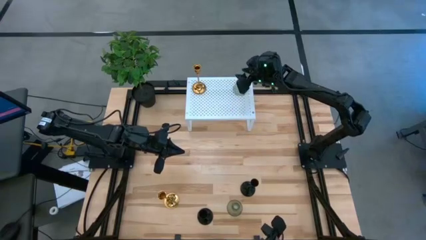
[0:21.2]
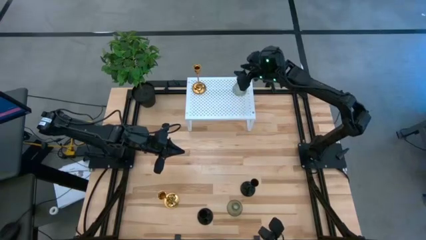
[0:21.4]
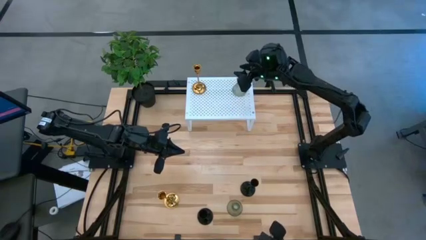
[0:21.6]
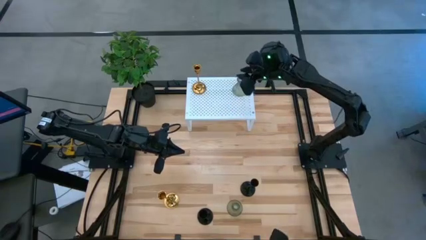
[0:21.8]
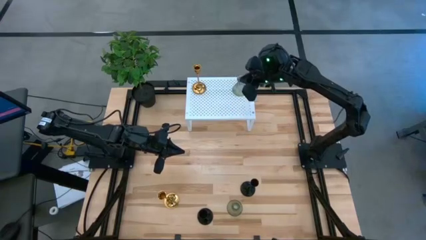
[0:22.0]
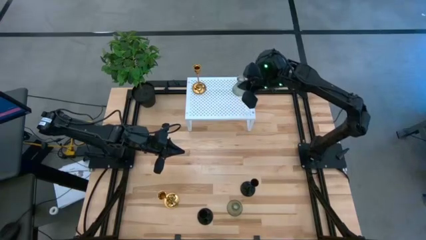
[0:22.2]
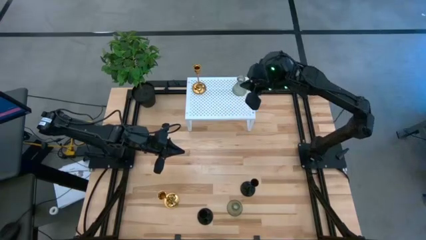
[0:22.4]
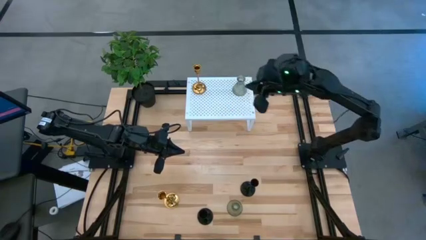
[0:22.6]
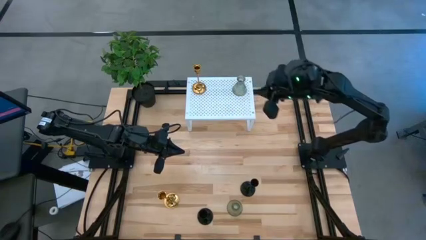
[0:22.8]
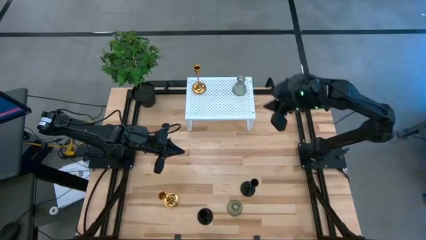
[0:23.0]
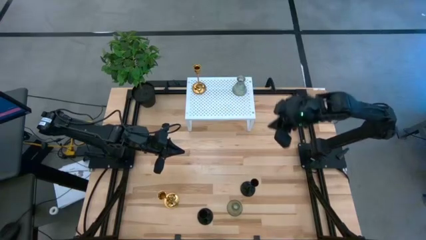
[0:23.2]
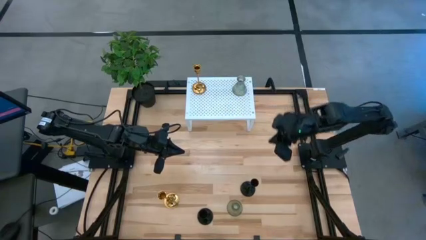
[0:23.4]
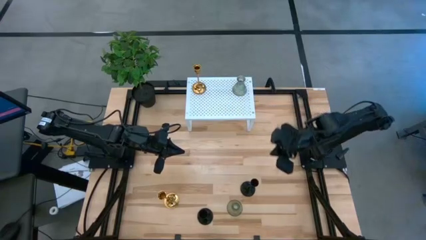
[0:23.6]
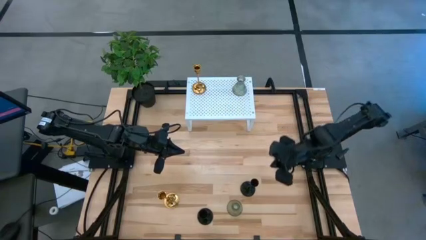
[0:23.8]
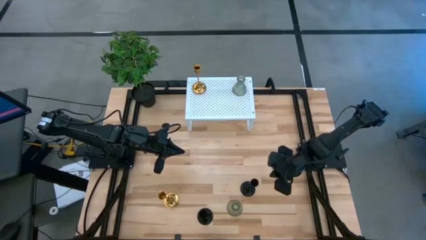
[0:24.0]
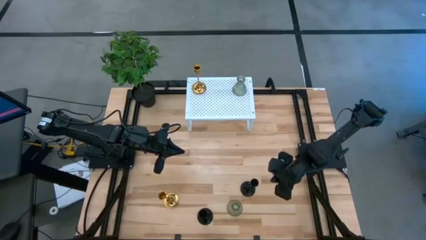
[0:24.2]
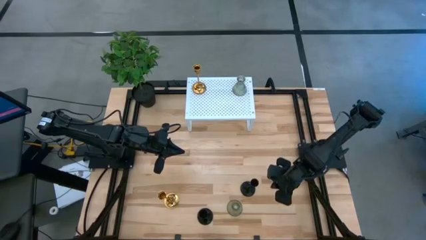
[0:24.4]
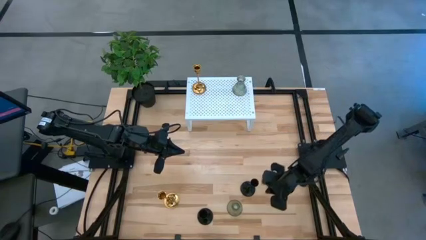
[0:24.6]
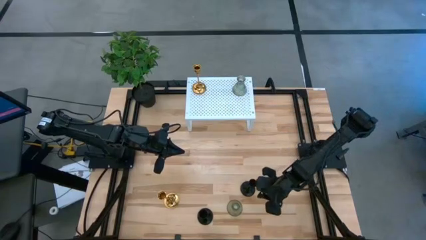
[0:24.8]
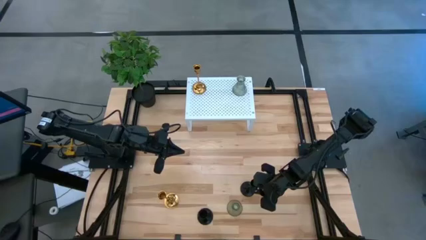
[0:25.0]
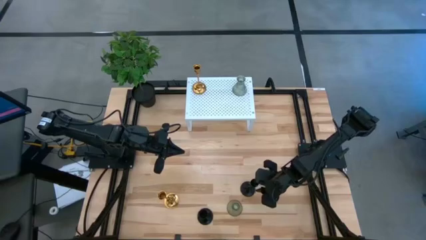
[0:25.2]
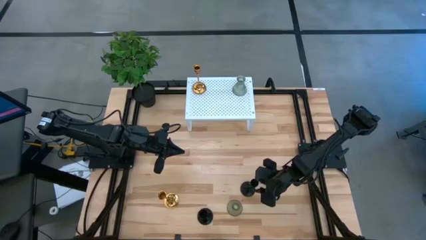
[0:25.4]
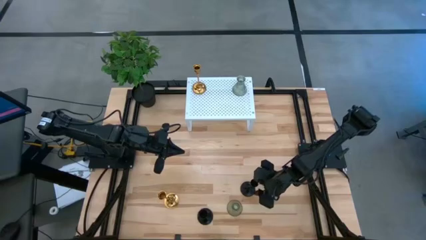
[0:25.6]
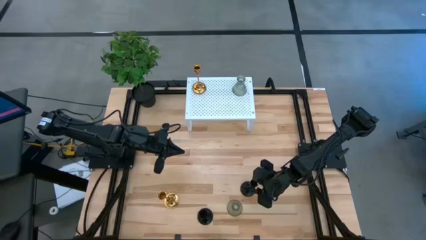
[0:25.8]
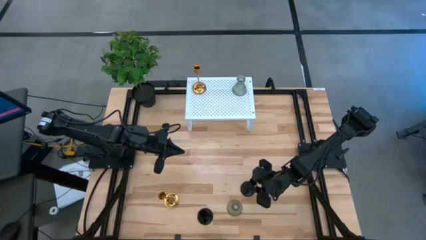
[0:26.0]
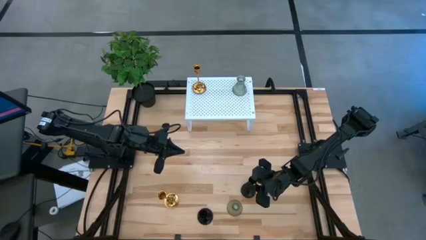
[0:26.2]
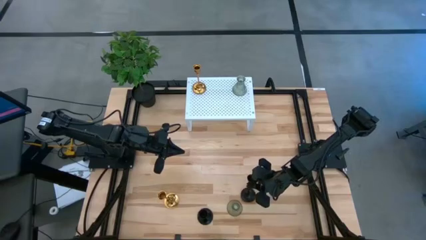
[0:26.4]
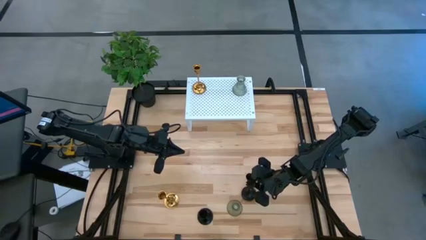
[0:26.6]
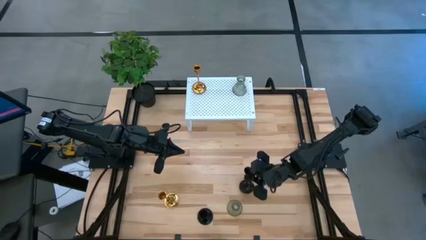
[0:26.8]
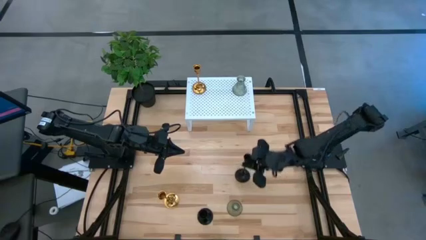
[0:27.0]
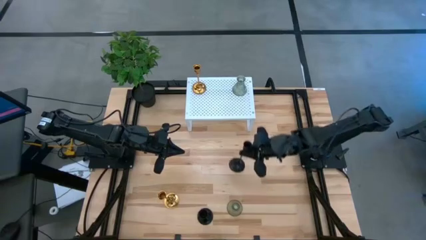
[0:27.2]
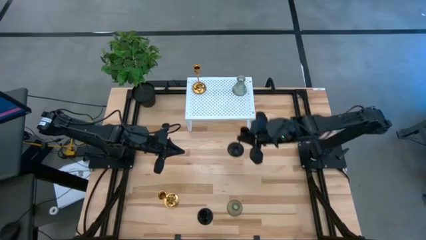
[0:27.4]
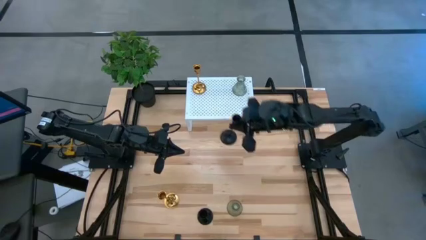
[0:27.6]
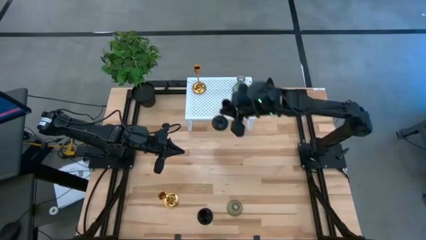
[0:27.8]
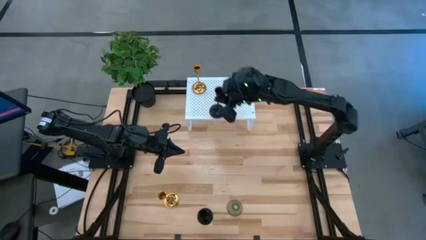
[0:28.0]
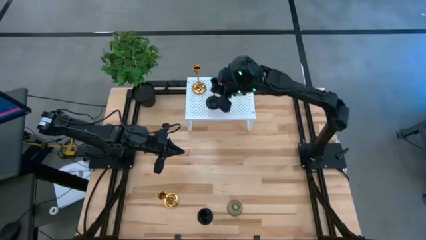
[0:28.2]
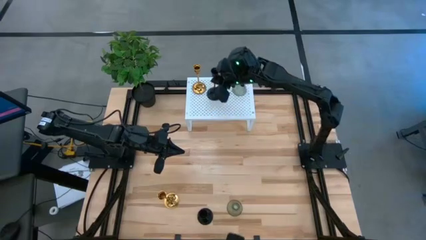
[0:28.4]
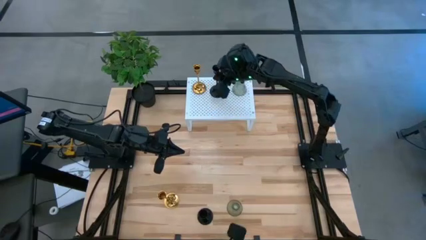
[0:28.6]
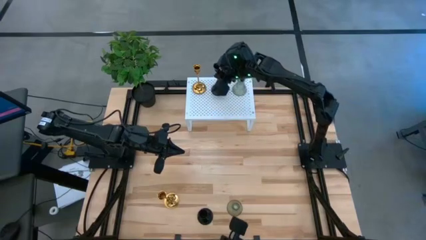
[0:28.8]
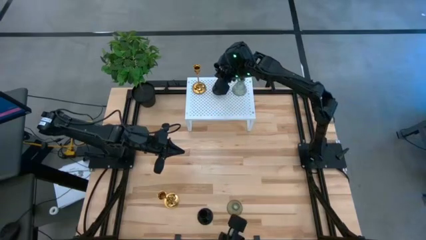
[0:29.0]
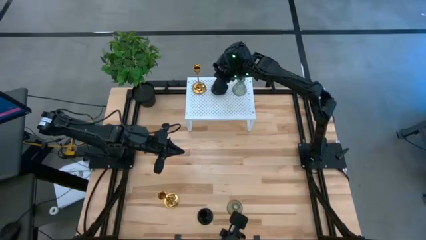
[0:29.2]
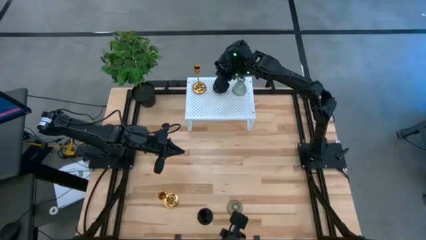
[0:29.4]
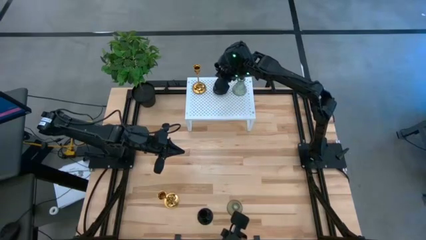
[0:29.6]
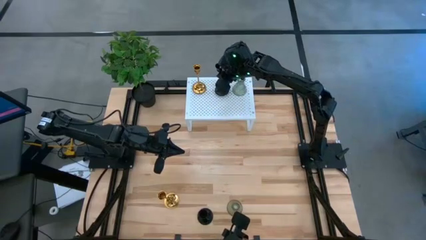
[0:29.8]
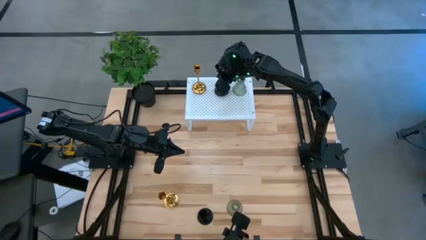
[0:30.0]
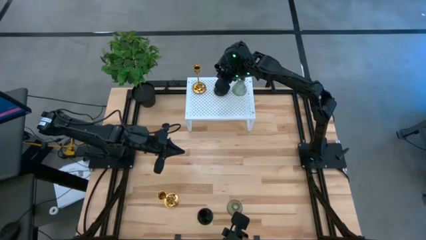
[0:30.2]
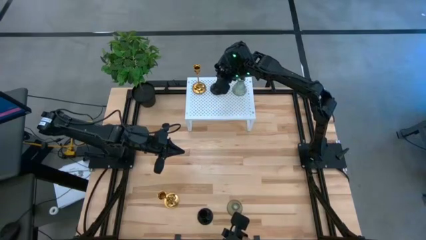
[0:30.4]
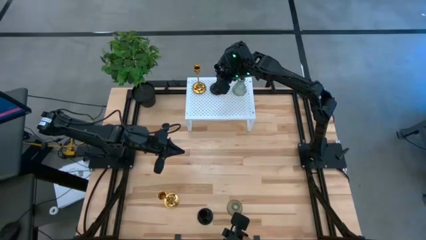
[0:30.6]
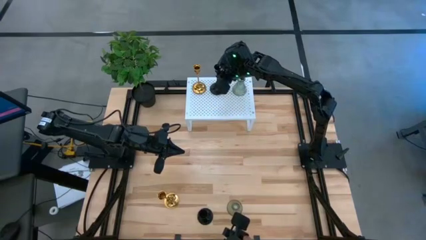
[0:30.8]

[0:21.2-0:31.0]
Task: Pick & Place candle stick holders
Put the right black candle holder on the shelf

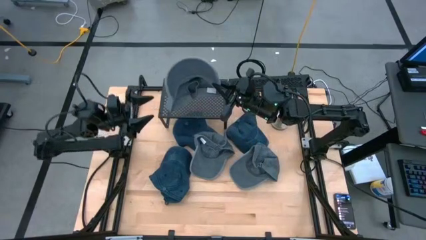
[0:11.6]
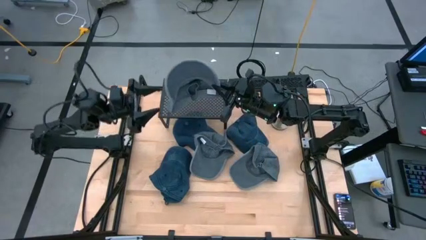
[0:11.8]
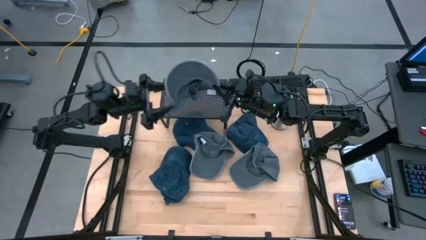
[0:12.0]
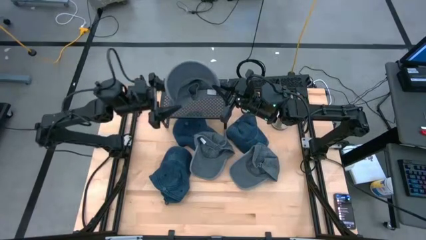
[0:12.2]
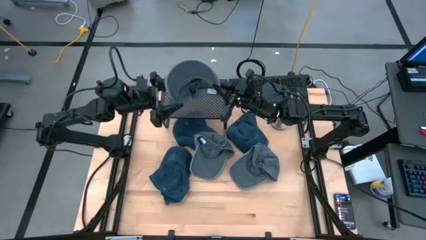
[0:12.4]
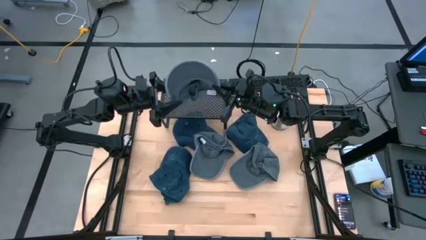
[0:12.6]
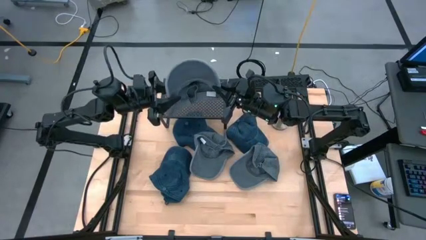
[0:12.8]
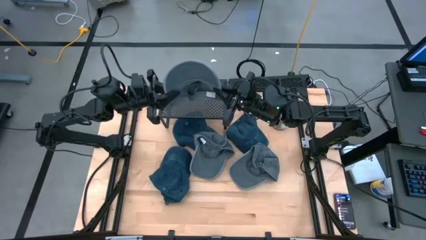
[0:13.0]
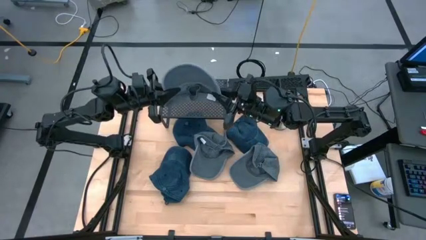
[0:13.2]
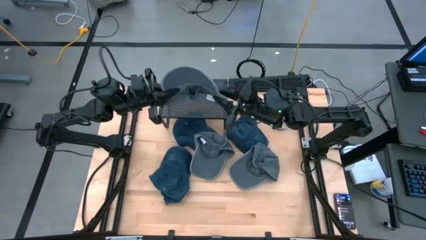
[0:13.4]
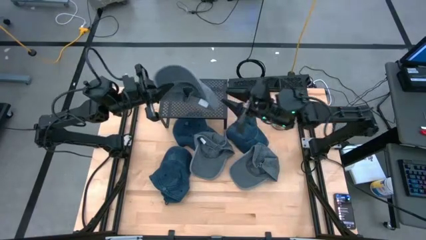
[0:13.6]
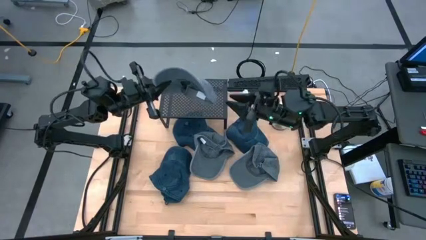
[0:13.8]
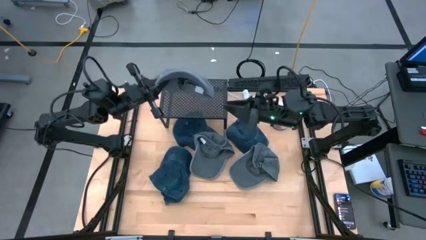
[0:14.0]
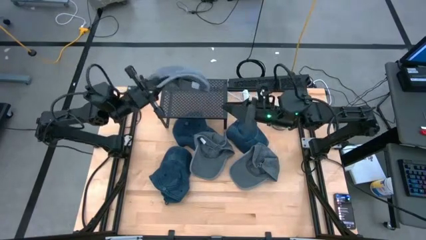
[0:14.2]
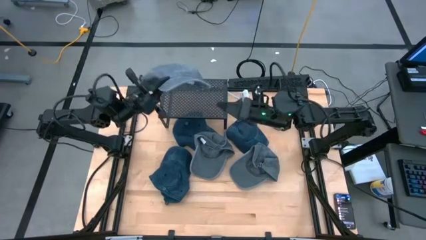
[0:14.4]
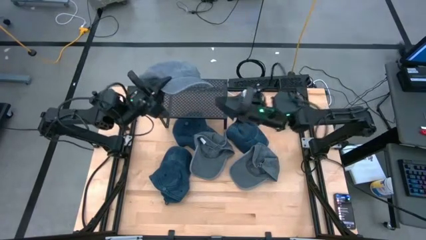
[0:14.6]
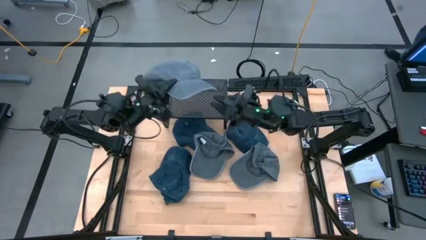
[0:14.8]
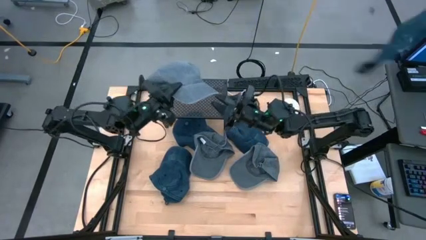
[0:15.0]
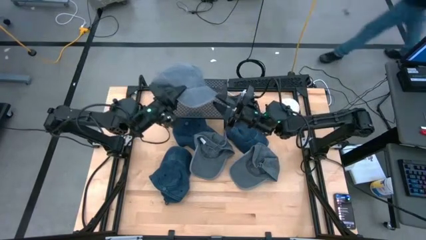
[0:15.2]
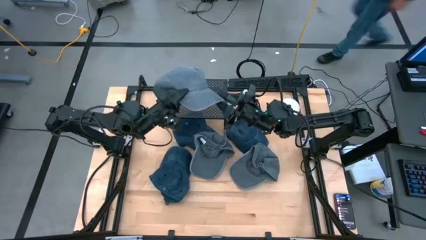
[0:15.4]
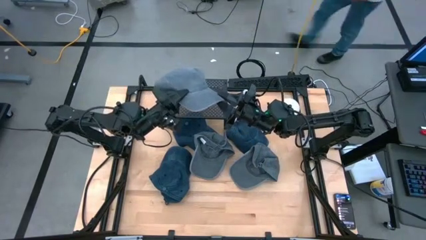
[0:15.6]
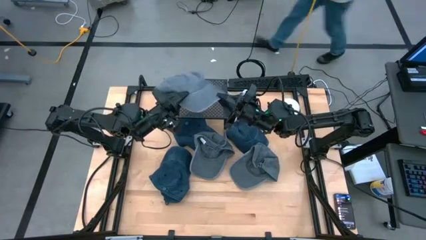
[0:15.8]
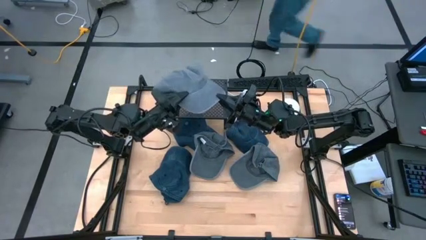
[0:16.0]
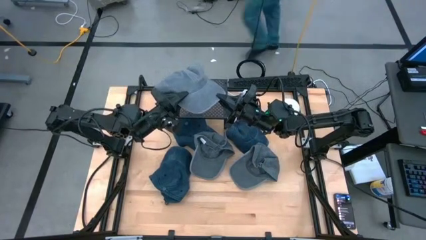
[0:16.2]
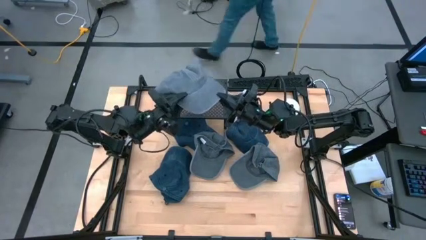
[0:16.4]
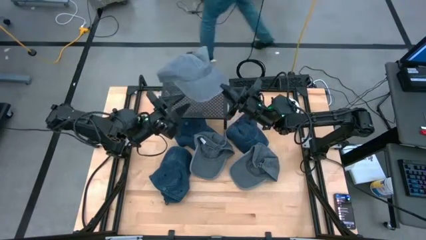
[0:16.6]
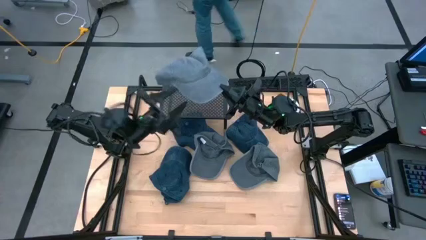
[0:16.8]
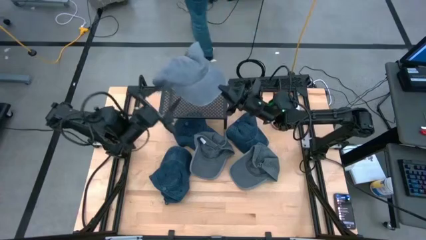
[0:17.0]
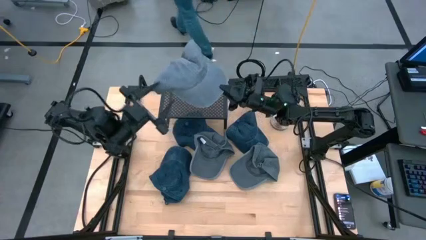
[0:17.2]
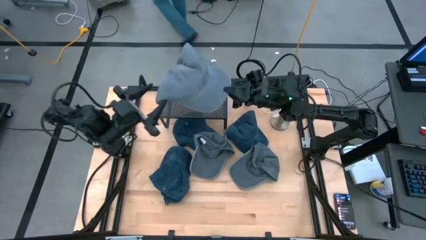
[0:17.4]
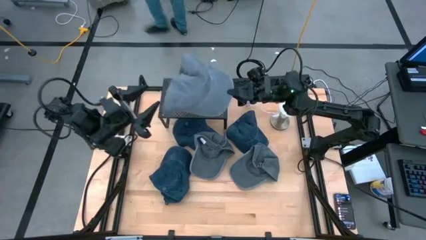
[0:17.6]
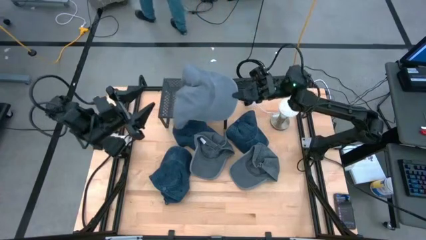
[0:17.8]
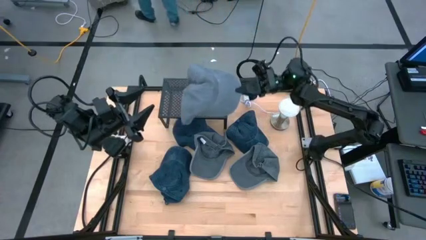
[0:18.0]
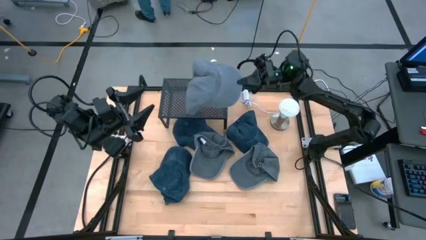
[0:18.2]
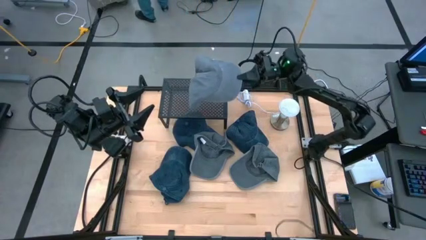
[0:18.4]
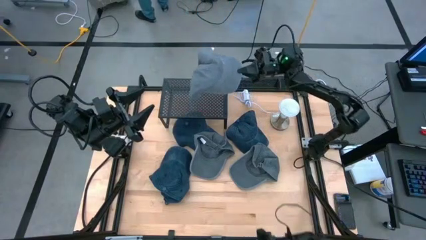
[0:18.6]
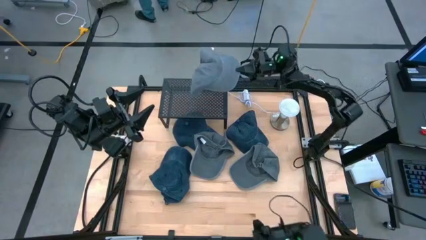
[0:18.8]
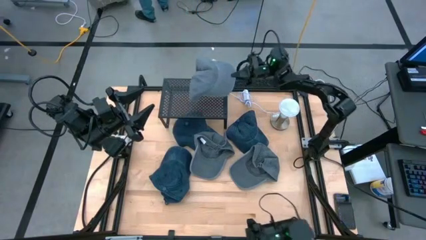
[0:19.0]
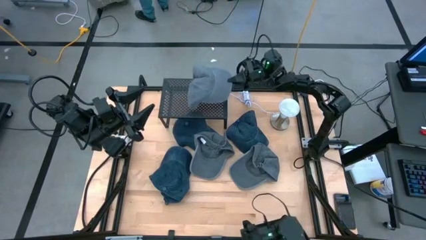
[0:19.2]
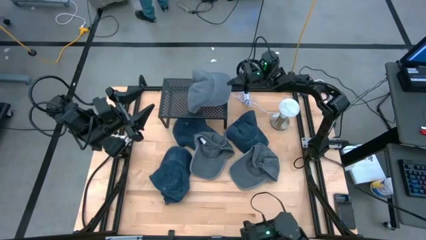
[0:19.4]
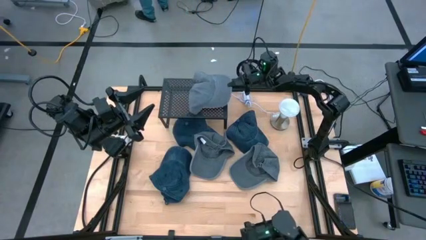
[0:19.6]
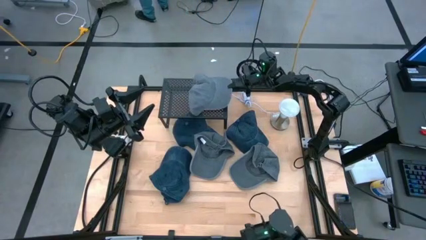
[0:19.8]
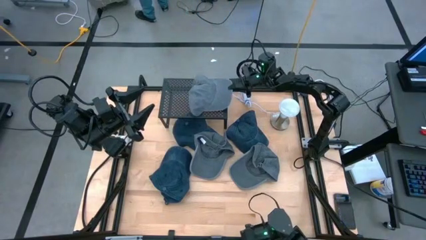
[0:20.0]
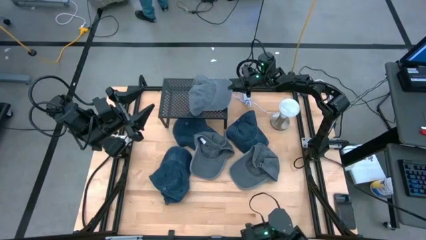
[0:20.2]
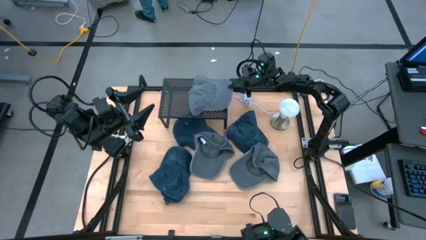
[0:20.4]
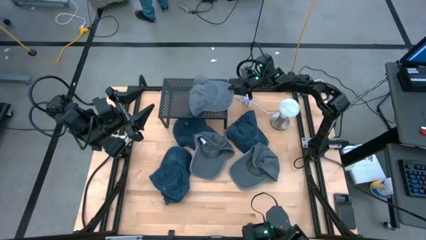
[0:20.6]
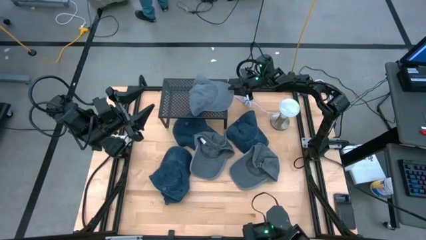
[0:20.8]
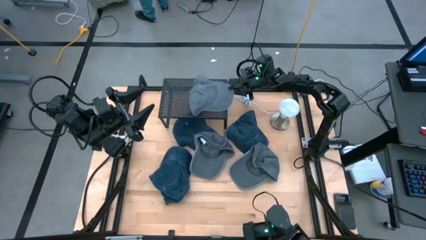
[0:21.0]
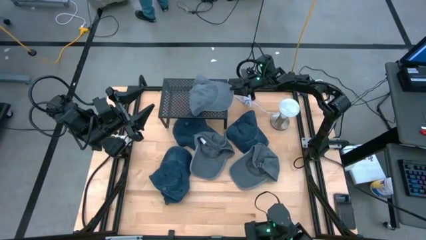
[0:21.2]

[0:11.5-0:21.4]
Task: Pick & Place hat
Put the bottom dark gray cap on the right side of the shelf
